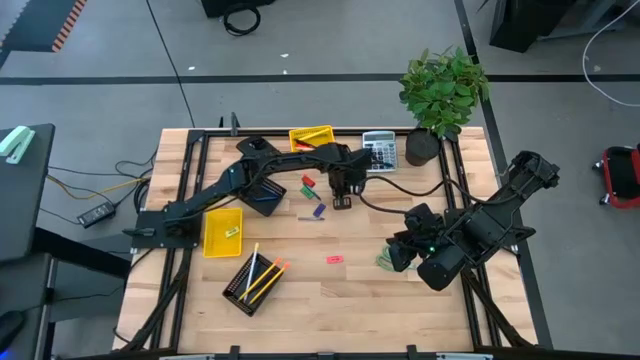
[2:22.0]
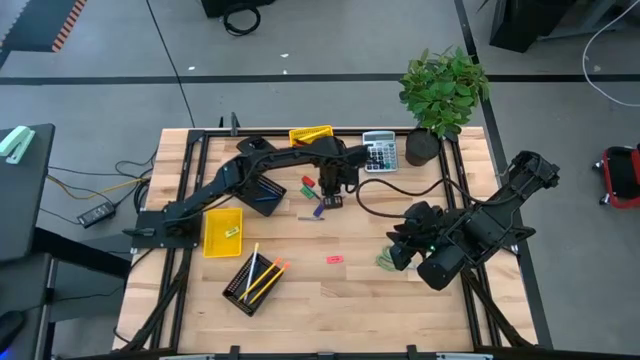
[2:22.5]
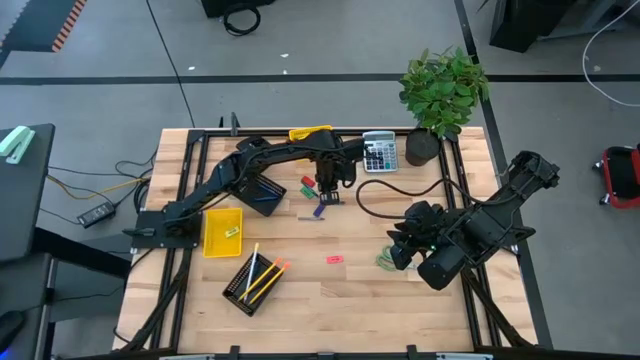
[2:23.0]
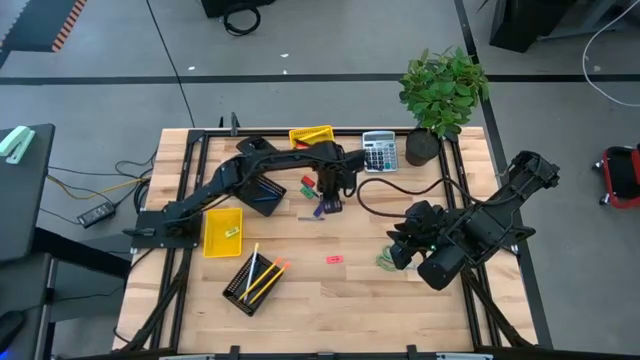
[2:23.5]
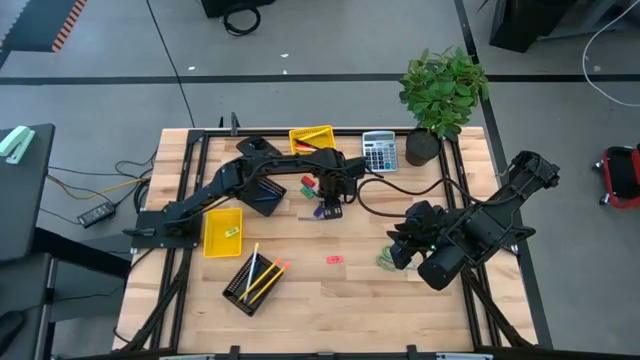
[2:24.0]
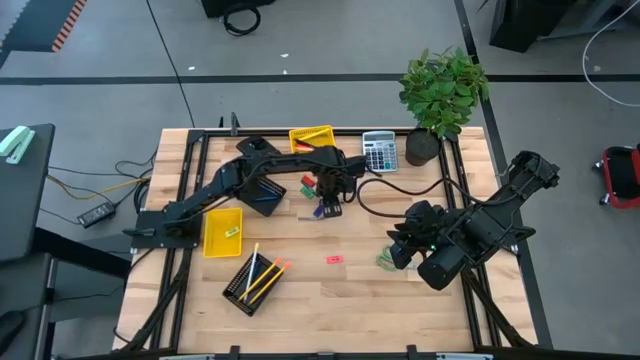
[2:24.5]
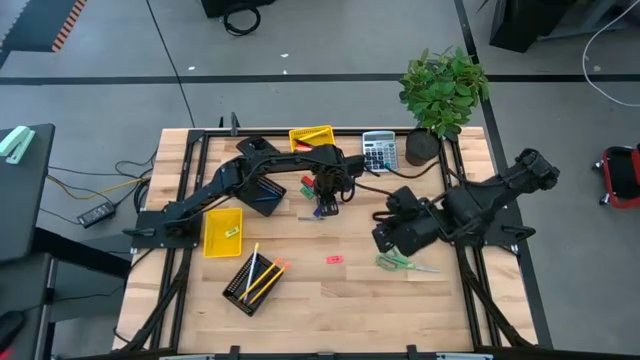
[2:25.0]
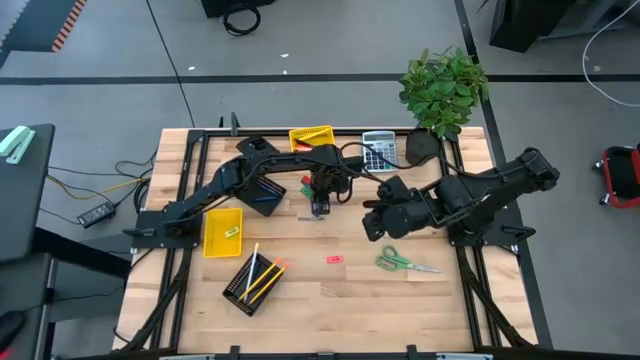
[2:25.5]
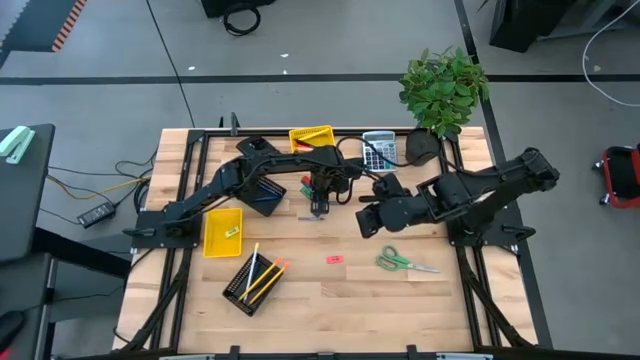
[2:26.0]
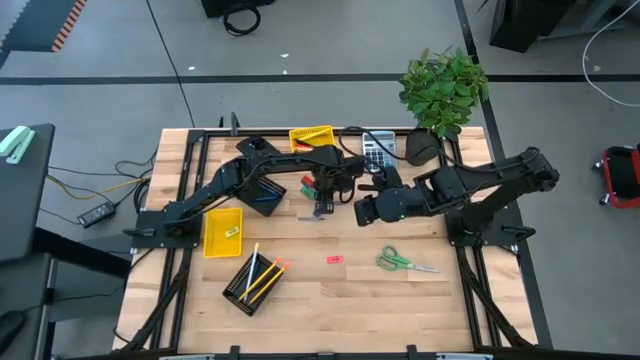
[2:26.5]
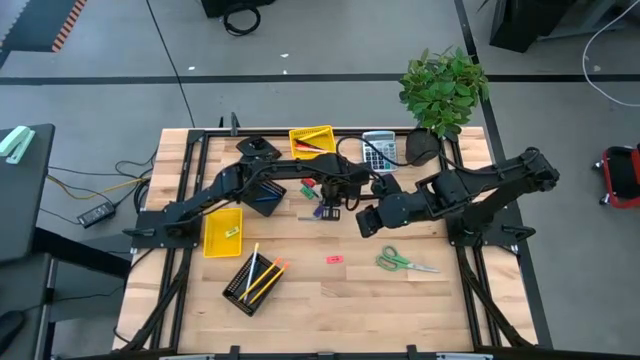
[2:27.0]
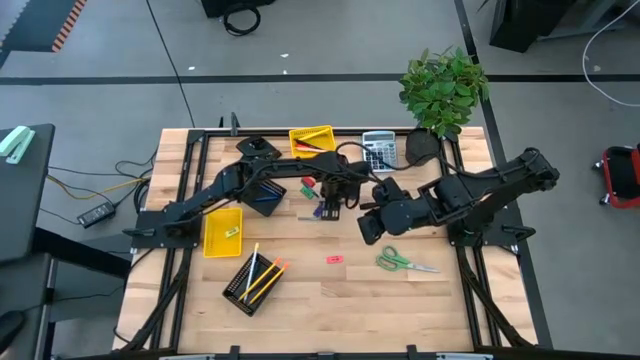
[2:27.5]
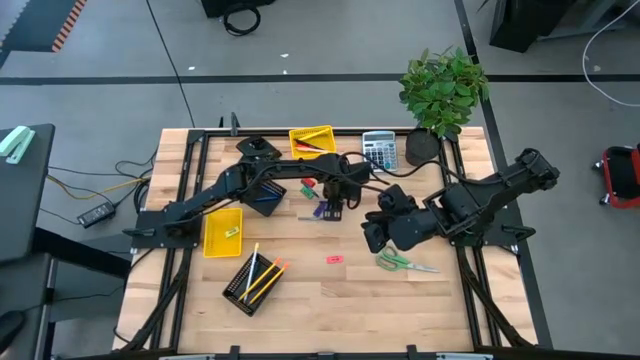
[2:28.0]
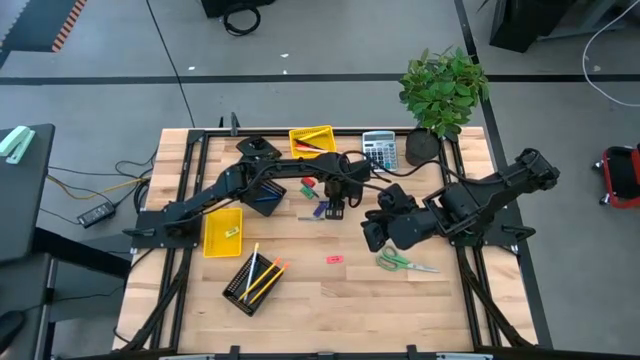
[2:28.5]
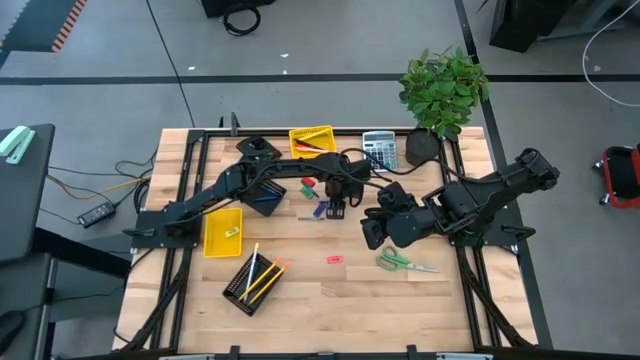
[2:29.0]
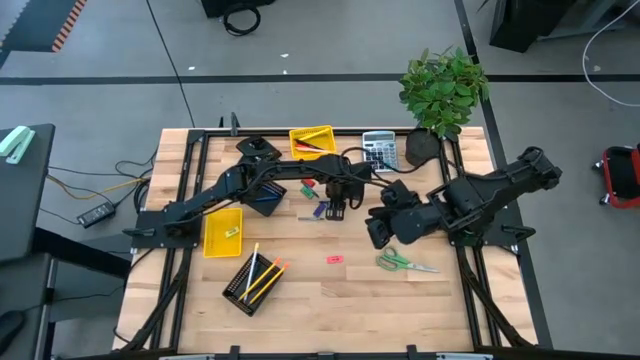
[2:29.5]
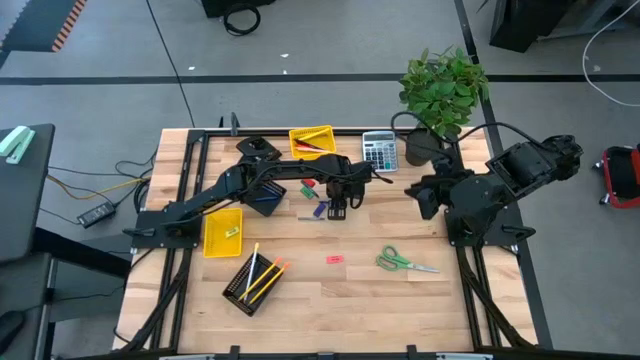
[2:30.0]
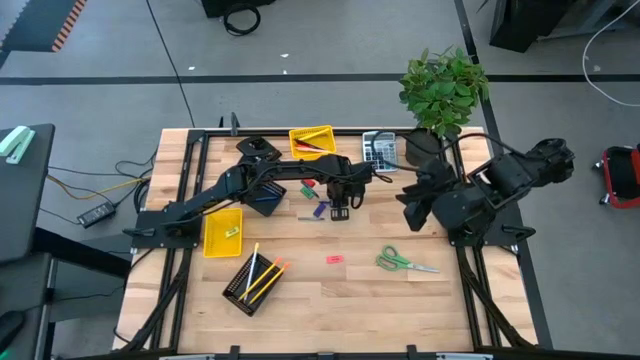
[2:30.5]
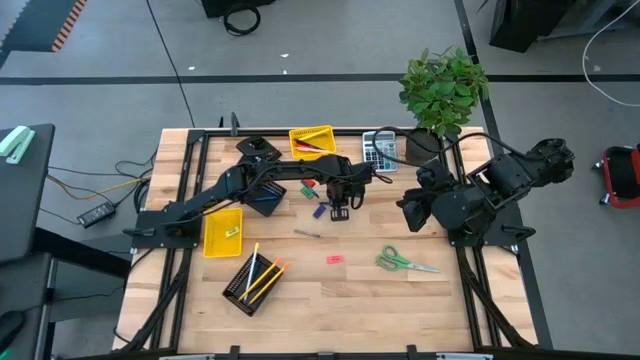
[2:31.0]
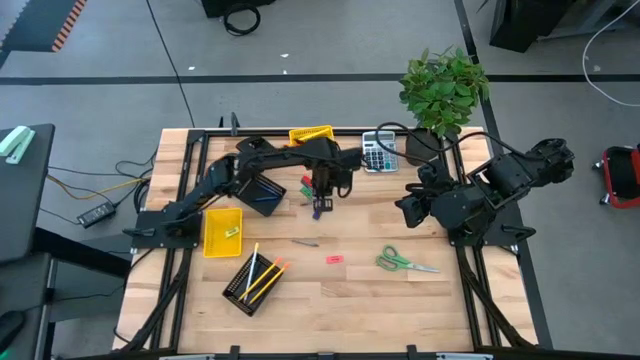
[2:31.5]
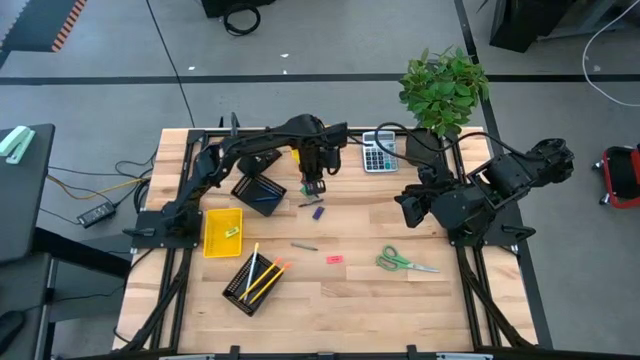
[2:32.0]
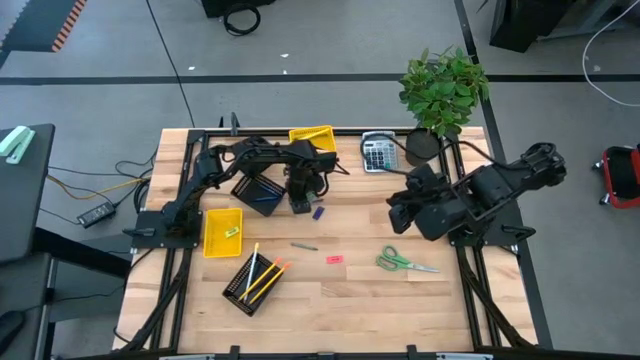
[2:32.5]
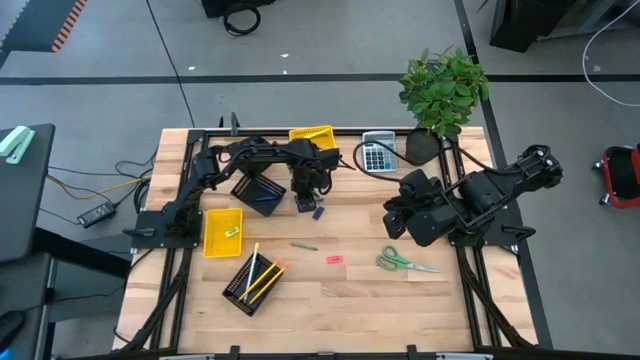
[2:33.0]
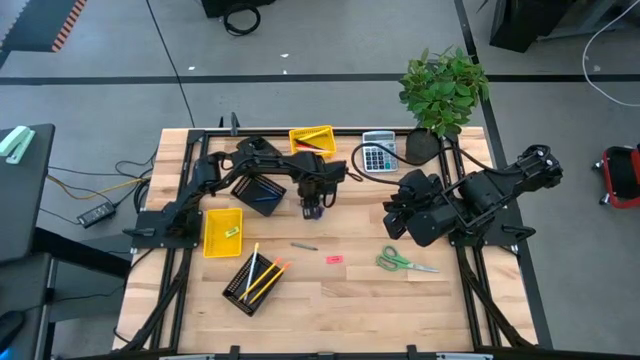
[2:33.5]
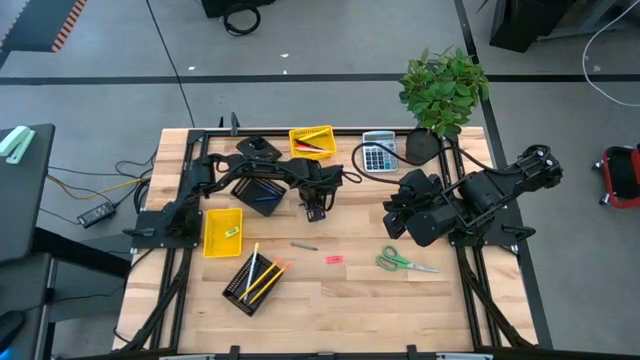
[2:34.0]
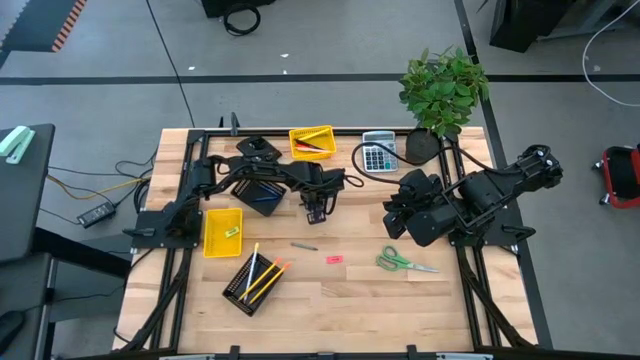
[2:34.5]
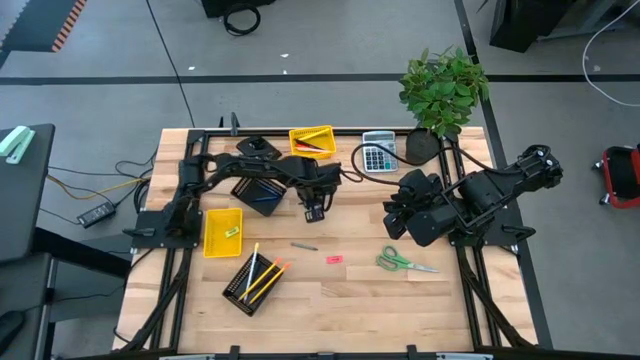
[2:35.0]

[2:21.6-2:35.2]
Task: Sort crayons/erasers/pens/pencils in bins
Put the blue crayon into the top black basket

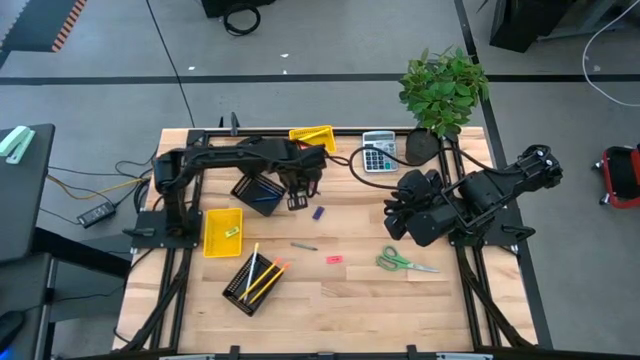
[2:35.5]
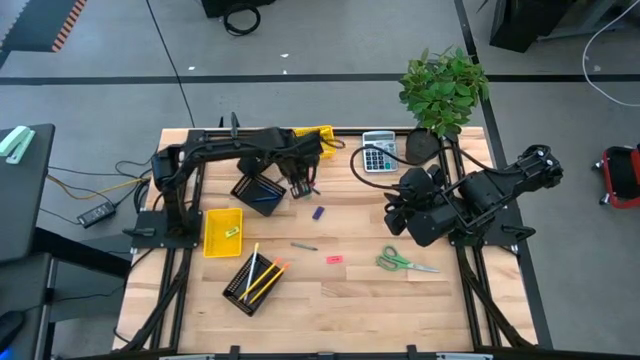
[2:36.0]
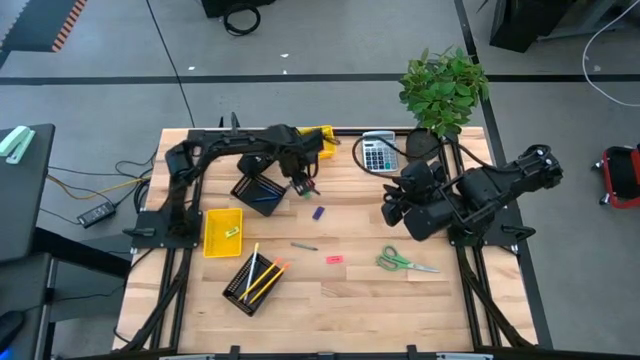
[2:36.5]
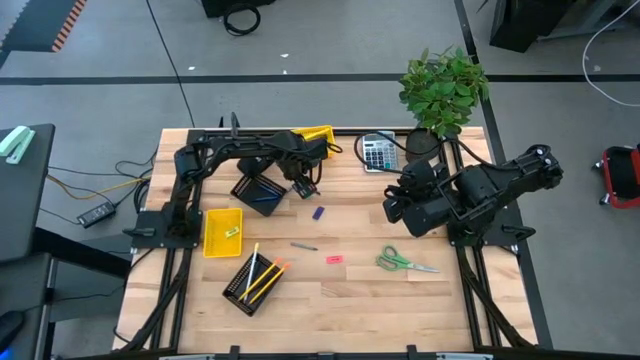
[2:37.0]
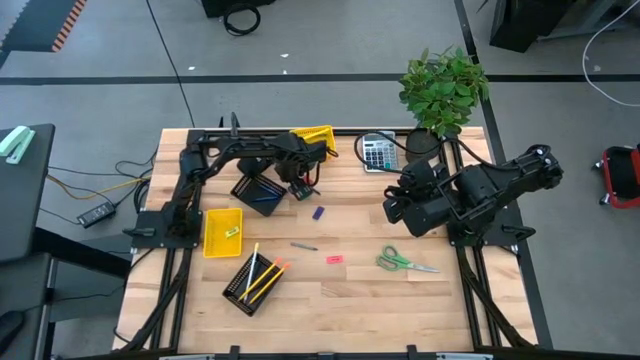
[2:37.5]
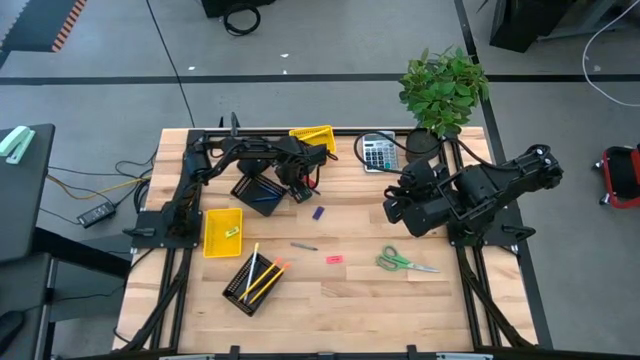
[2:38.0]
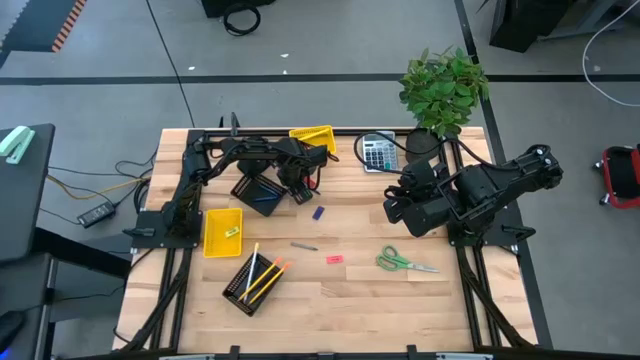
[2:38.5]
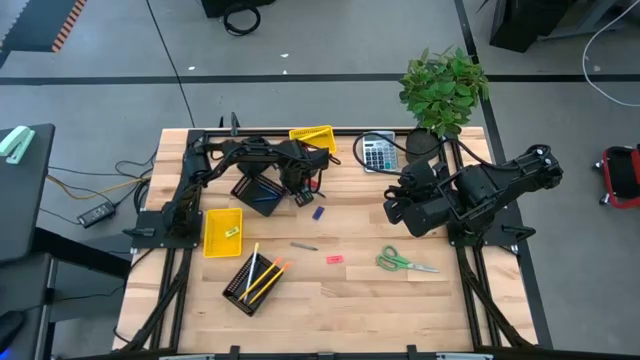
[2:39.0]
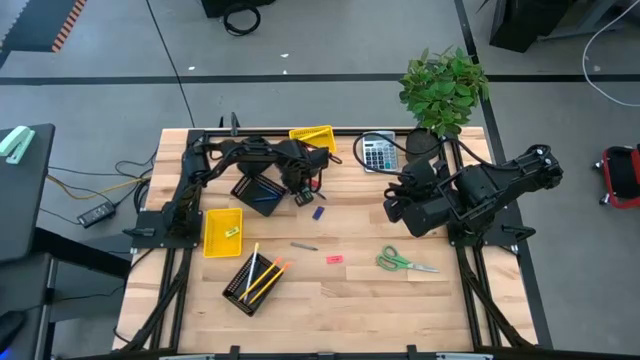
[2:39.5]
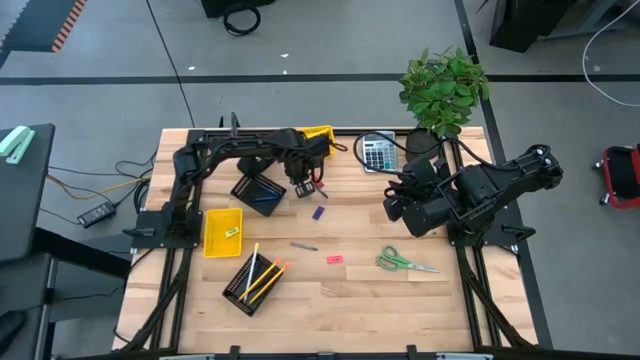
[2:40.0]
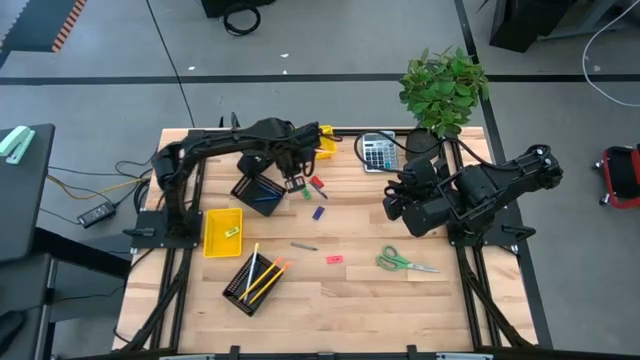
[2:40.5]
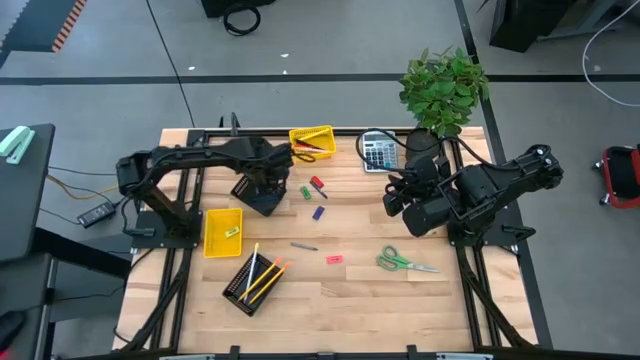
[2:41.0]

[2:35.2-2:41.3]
Put the blue crayon into the top black basket

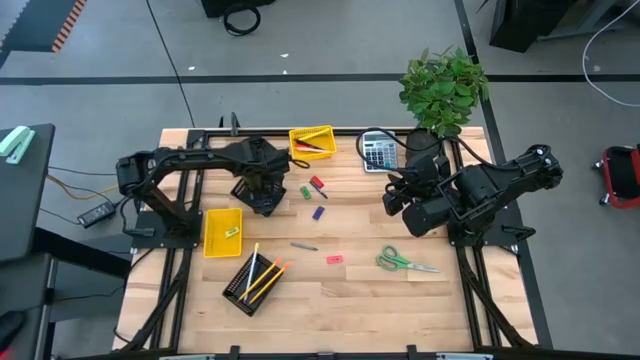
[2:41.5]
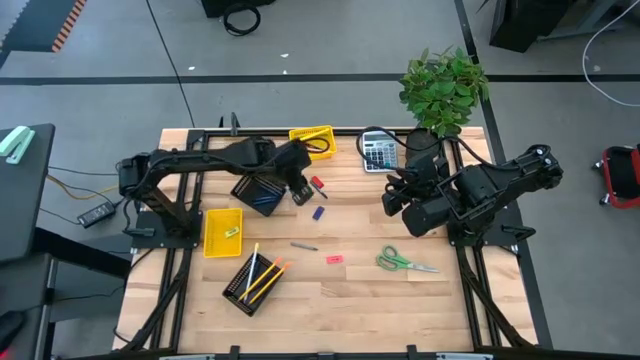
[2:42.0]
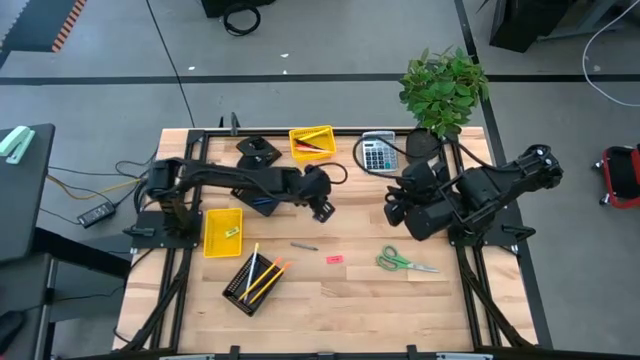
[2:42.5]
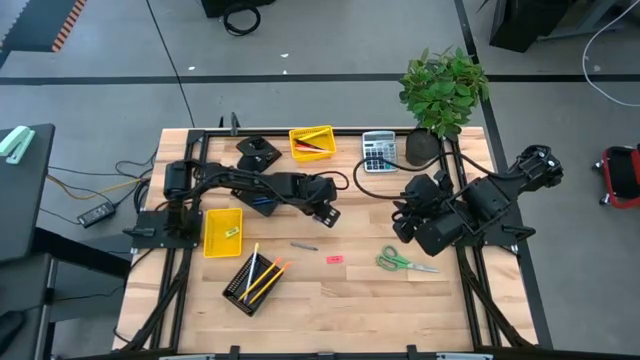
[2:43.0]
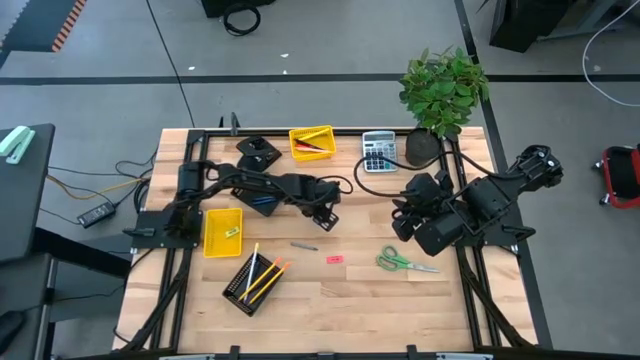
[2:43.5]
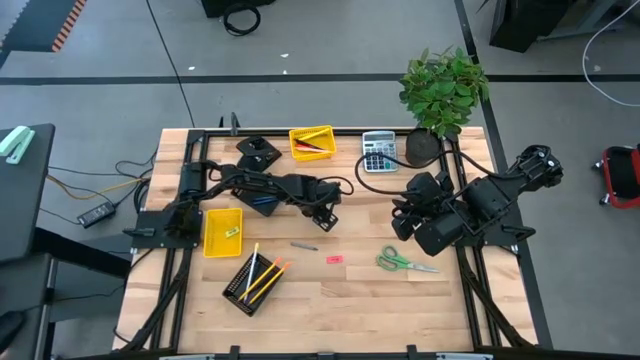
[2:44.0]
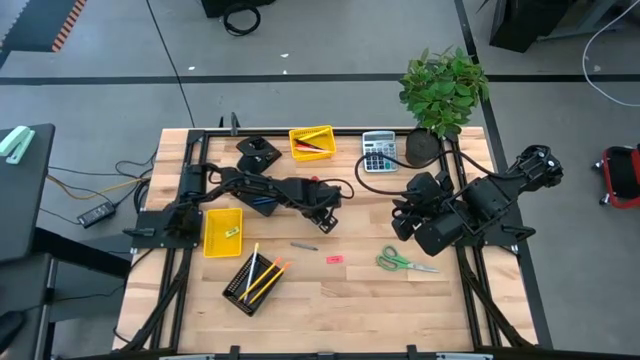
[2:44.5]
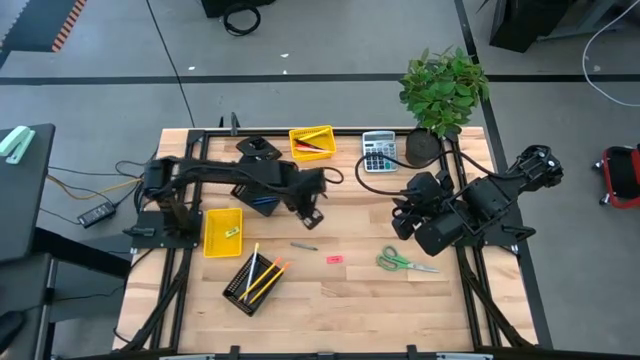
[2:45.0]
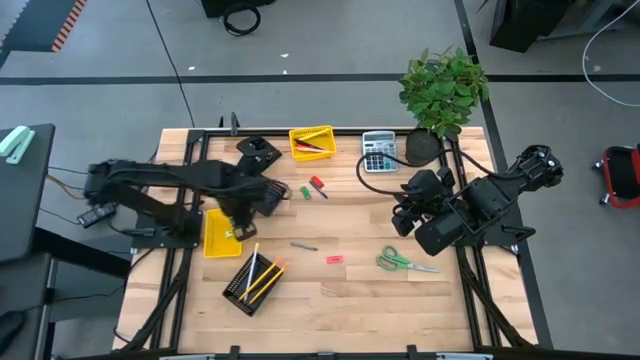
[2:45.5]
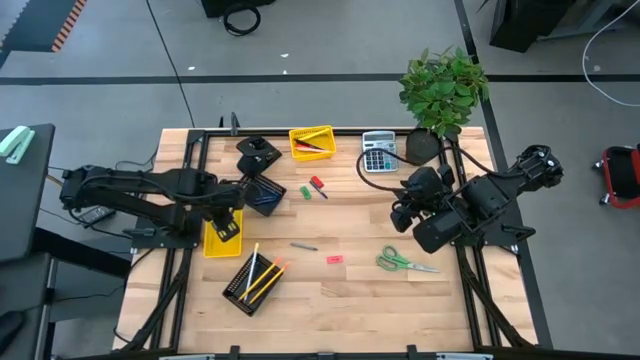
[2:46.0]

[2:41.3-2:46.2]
Put the blue eraser into the bottom yellow basket
